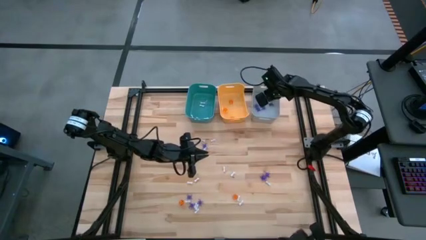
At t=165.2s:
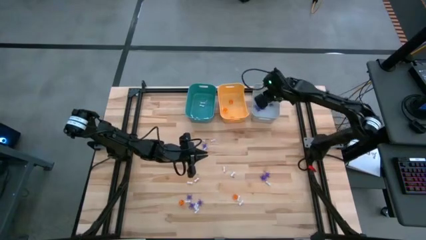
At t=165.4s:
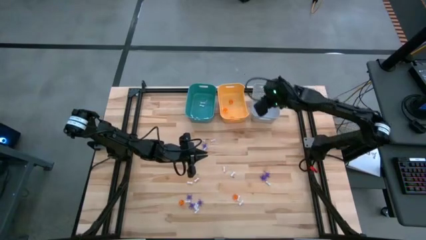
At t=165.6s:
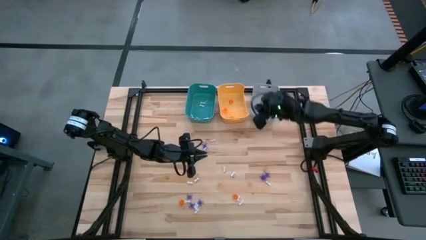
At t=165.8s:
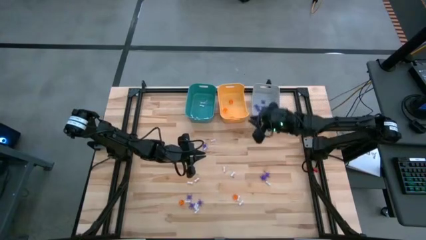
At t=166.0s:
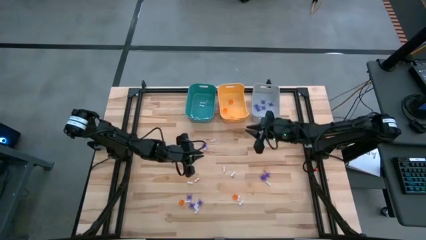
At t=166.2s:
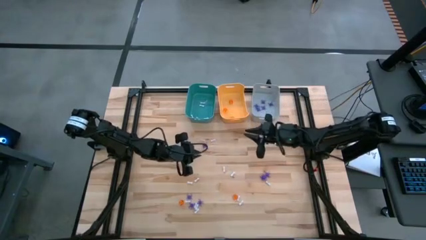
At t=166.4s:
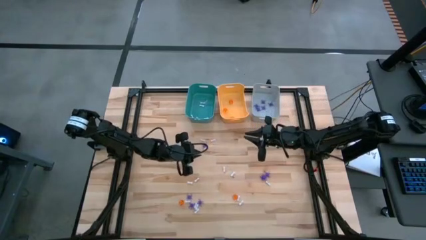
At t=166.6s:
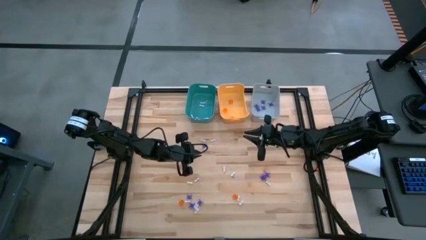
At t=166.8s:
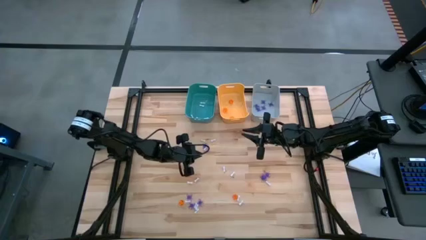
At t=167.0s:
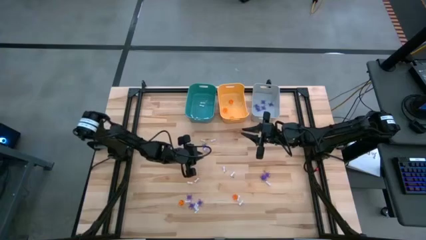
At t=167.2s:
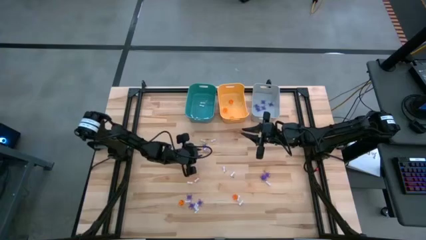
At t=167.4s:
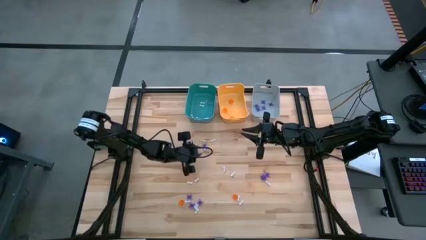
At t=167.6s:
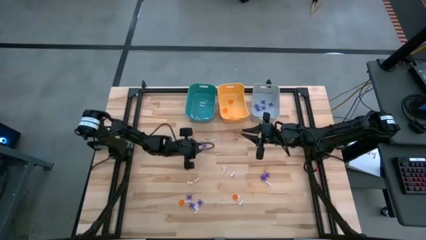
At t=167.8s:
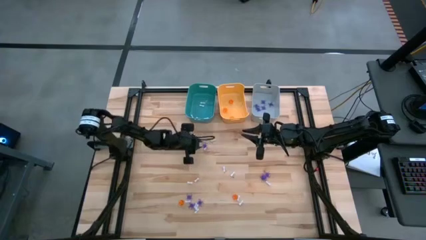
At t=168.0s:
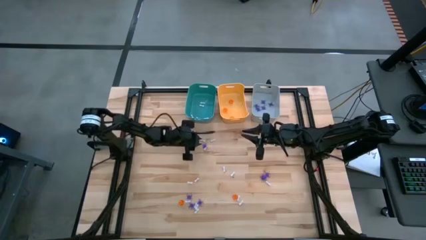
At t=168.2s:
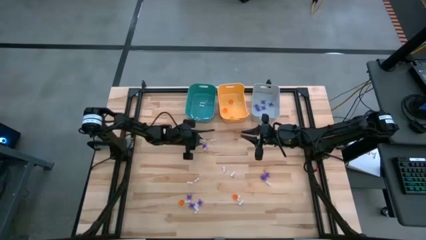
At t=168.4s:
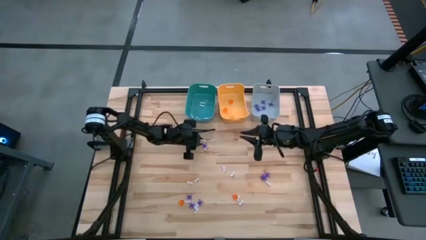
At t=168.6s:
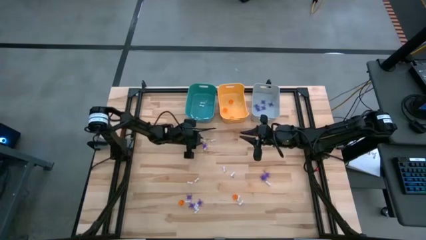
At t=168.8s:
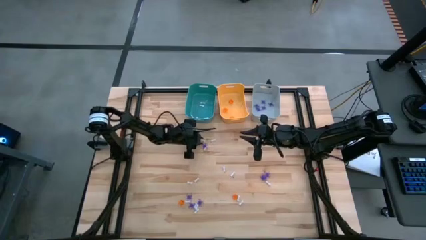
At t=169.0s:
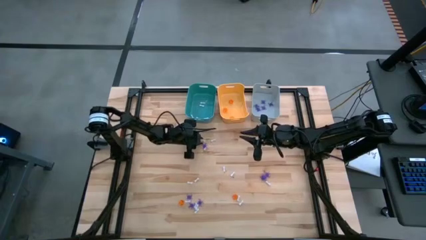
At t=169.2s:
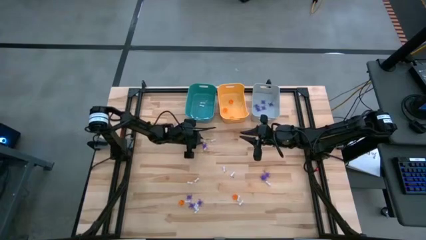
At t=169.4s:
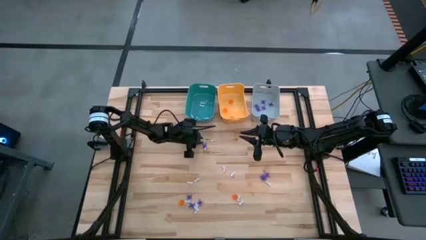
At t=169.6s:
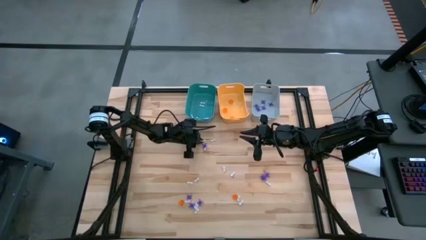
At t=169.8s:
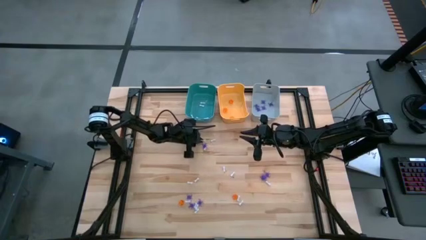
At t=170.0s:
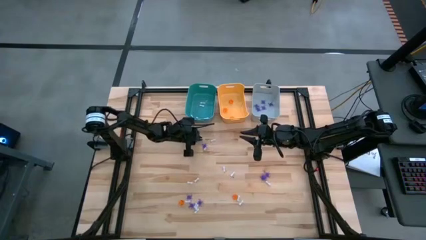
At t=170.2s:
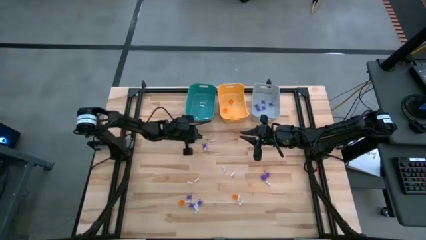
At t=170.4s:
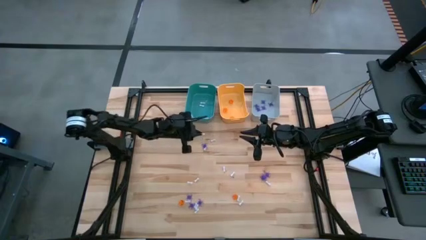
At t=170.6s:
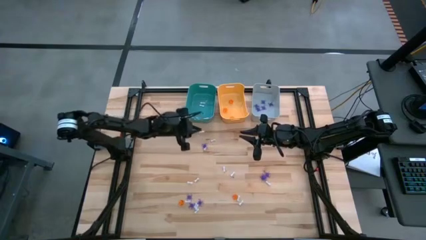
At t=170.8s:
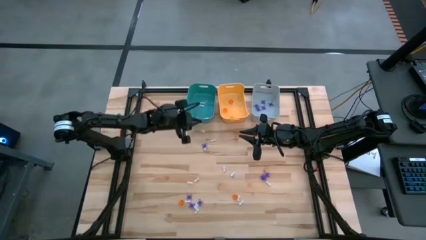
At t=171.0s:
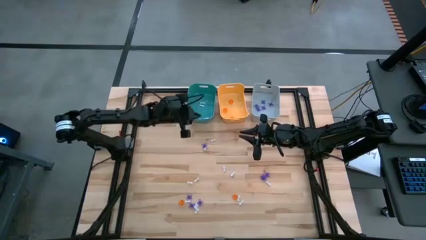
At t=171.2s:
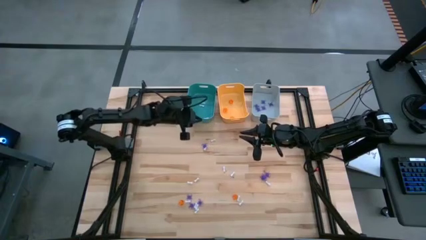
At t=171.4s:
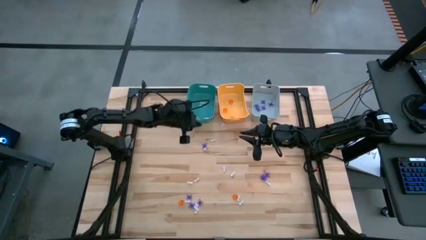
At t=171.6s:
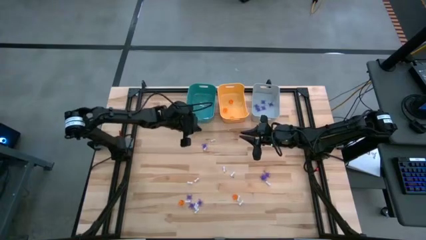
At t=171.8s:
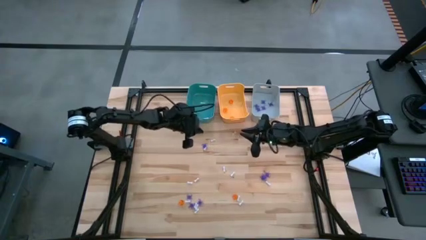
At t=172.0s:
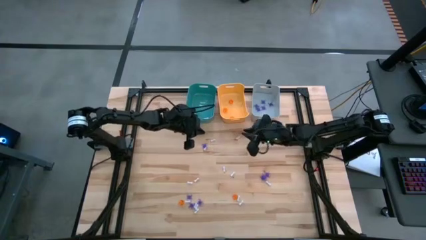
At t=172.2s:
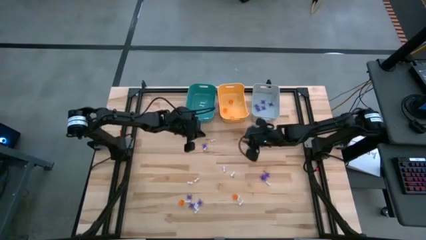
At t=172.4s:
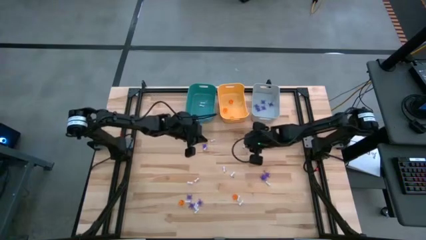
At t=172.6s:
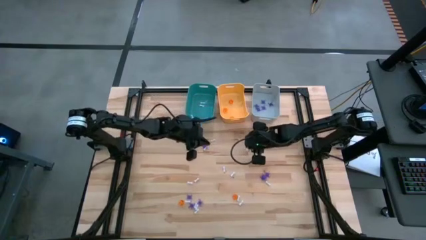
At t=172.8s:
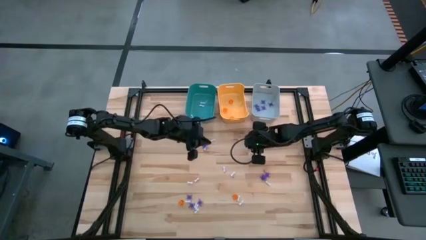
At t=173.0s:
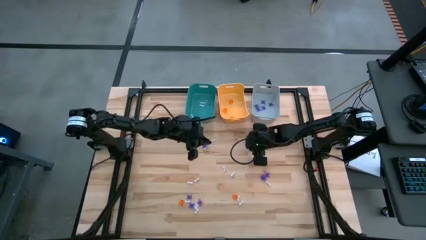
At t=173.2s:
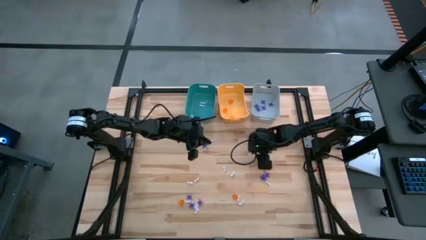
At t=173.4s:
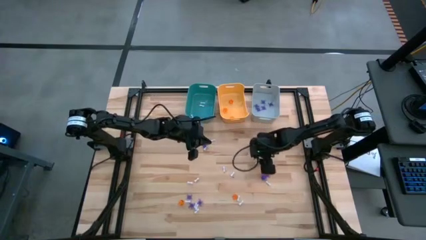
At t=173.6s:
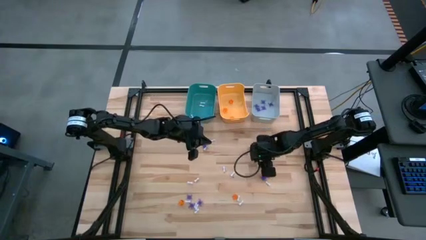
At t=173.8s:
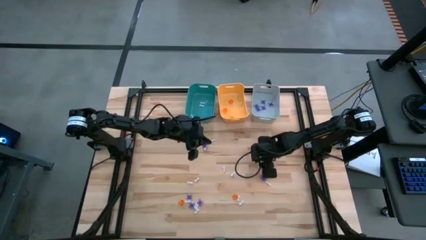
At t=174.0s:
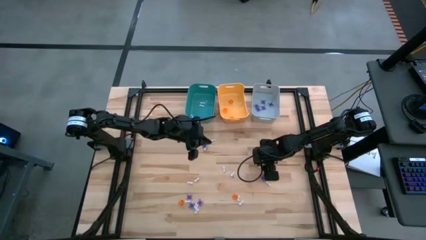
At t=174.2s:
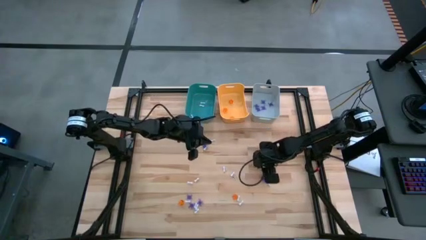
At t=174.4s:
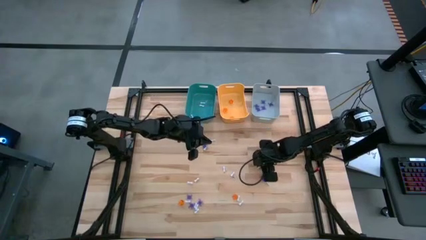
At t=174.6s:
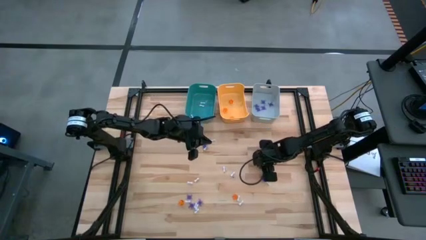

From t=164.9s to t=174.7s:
Task: Sort Halloween decoration
Put the white bone toy into the blue bin

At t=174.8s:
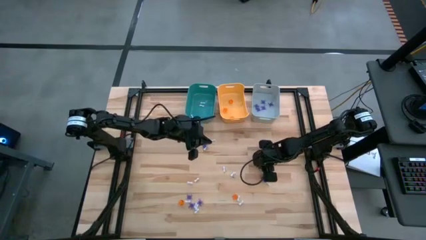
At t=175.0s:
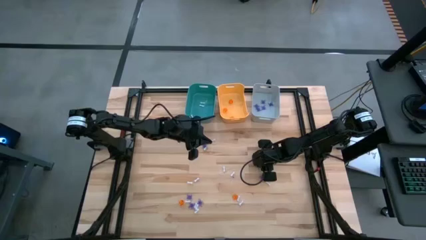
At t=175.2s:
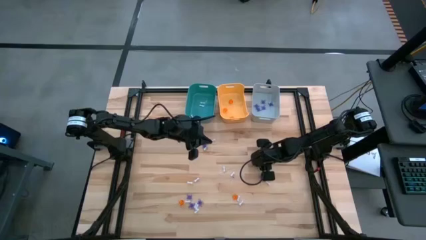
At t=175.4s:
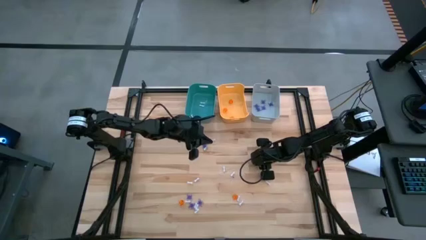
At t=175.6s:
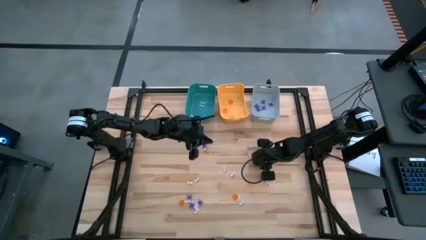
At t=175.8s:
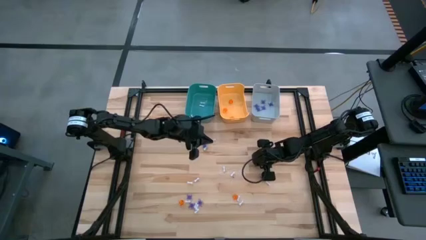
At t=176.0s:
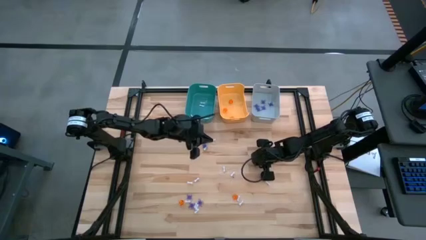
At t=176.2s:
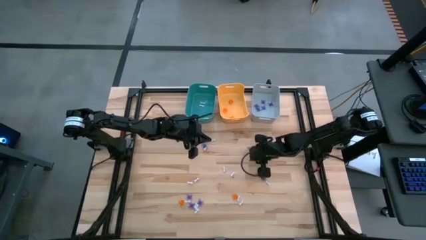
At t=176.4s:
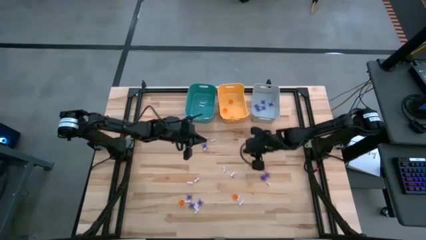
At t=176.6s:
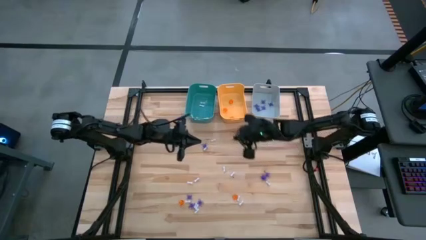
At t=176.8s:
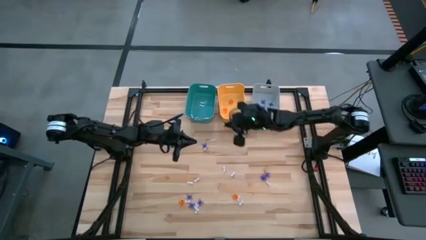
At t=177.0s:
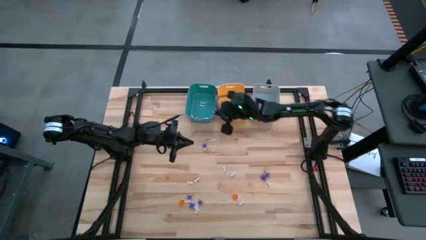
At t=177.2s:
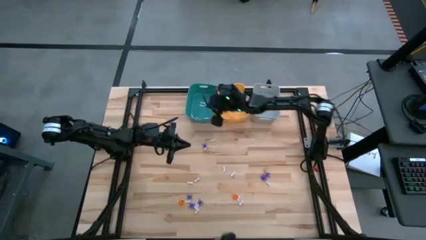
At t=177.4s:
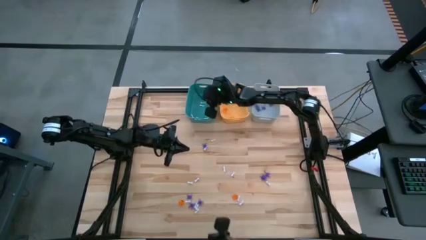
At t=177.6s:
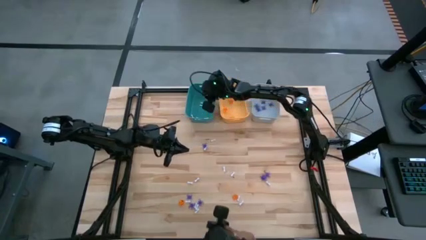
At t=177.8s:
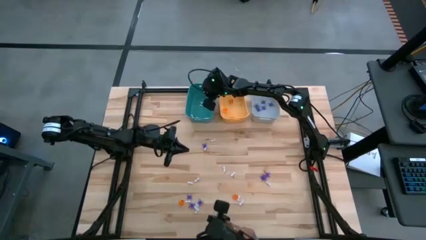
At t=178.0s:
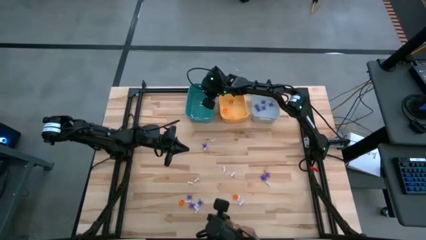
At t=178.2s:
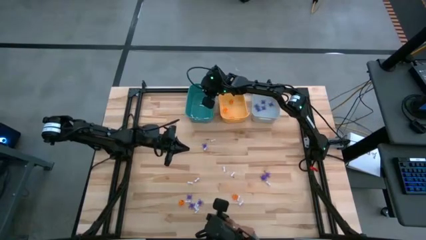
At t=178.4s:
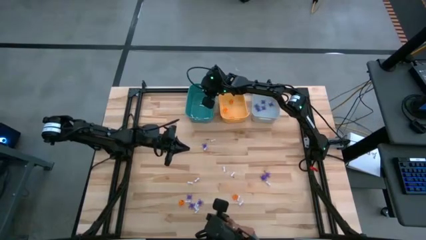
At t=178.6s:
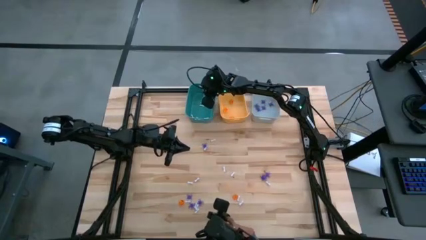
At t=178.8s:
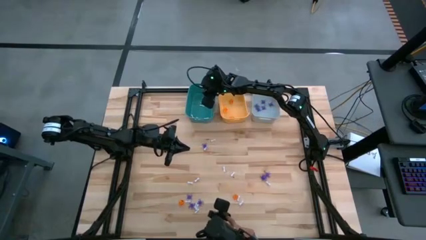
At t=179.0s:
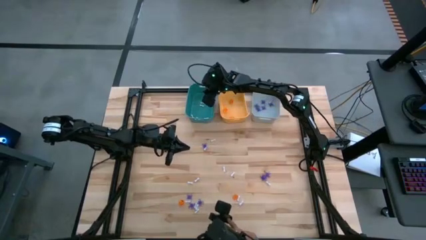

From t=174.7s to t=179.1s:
Put the white bone toy into the blue bin
